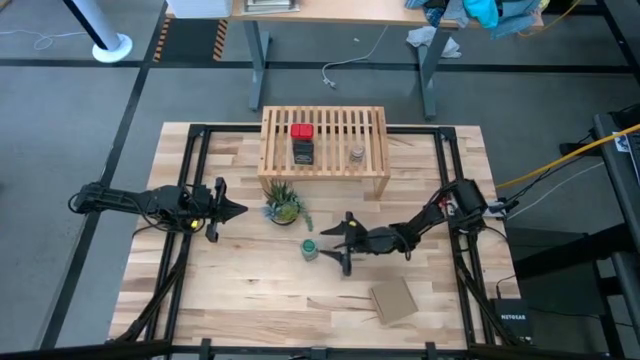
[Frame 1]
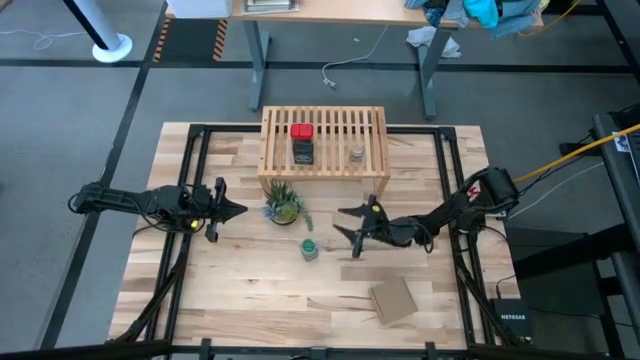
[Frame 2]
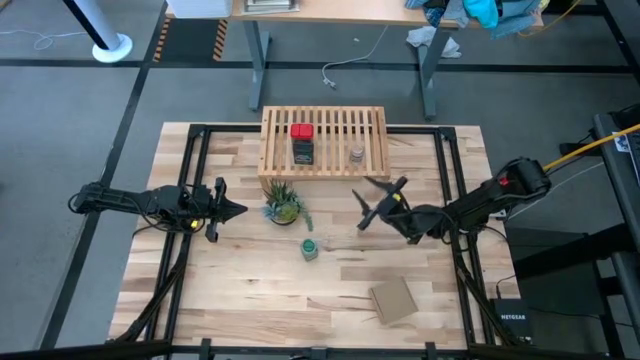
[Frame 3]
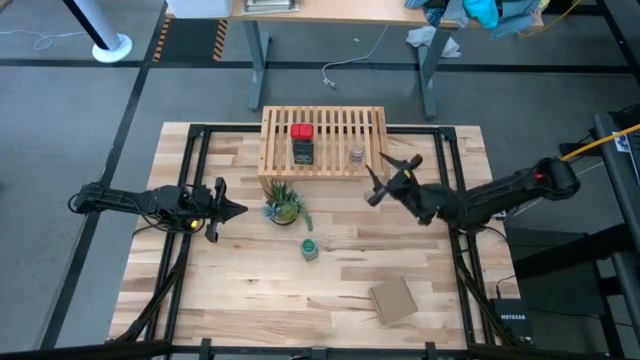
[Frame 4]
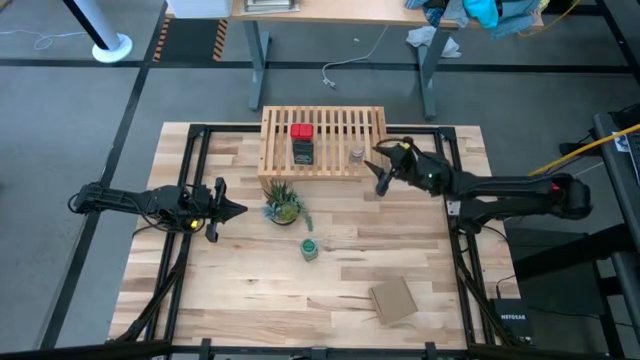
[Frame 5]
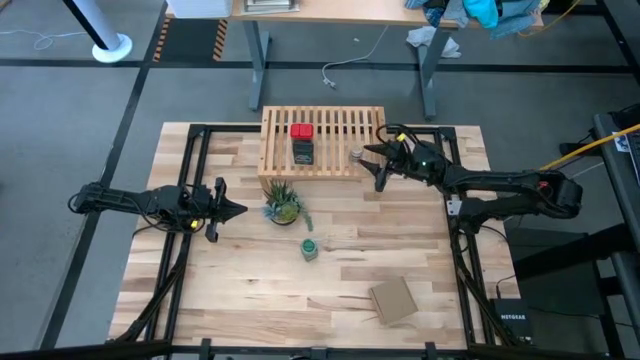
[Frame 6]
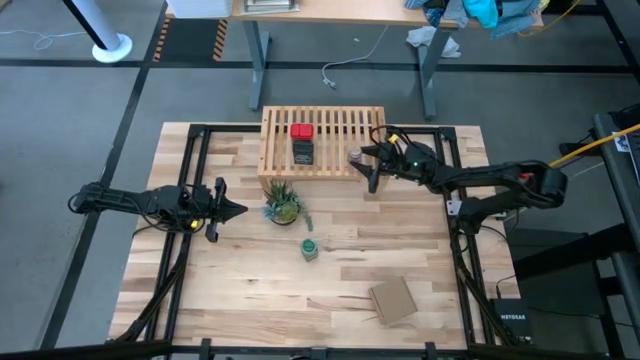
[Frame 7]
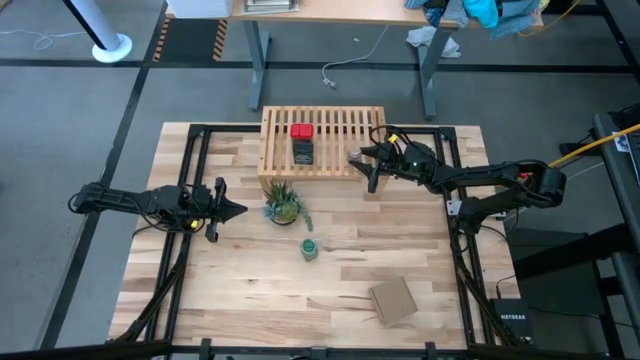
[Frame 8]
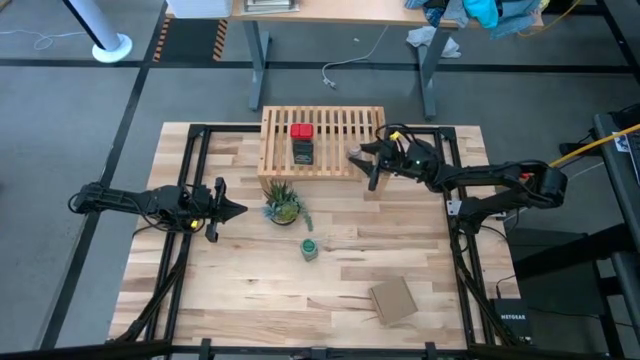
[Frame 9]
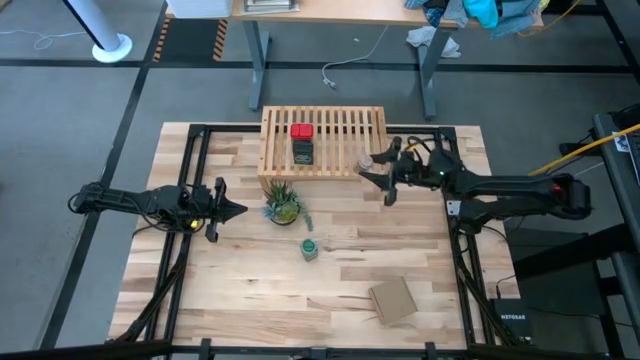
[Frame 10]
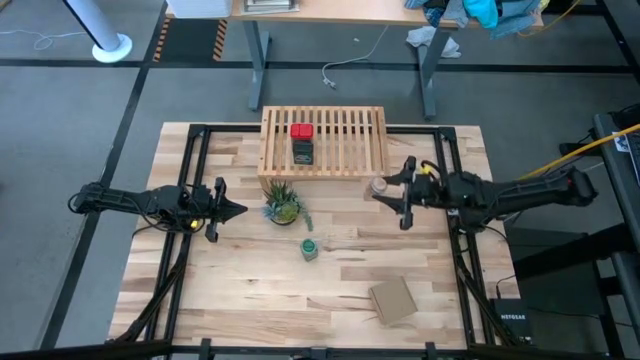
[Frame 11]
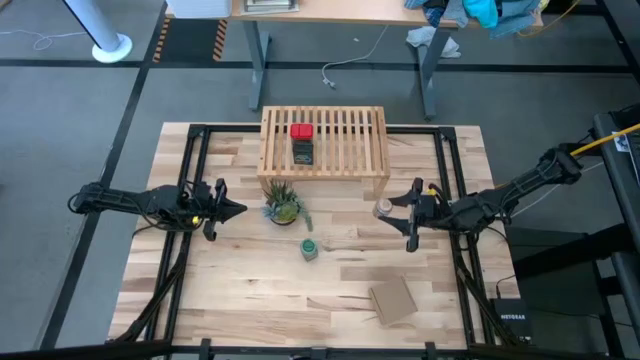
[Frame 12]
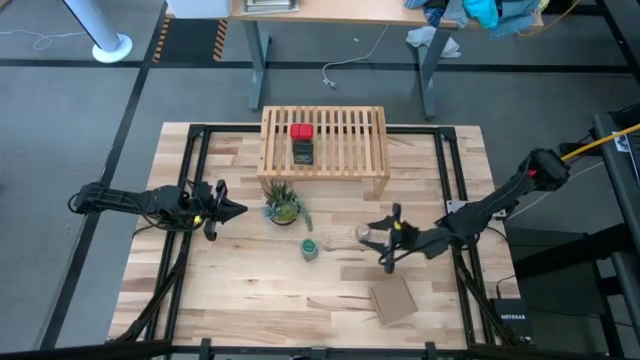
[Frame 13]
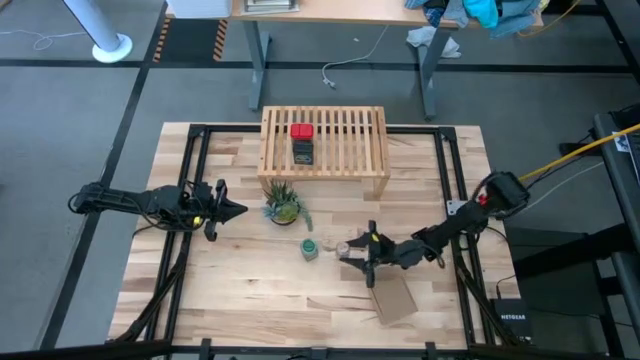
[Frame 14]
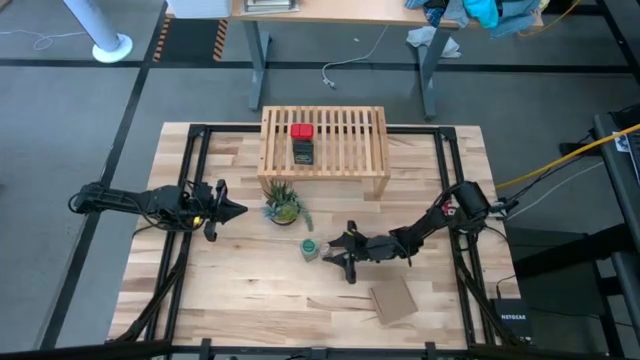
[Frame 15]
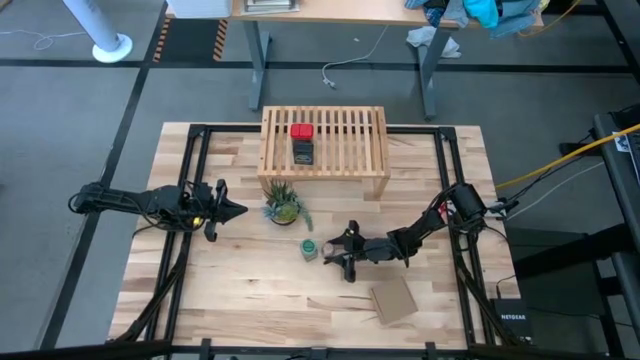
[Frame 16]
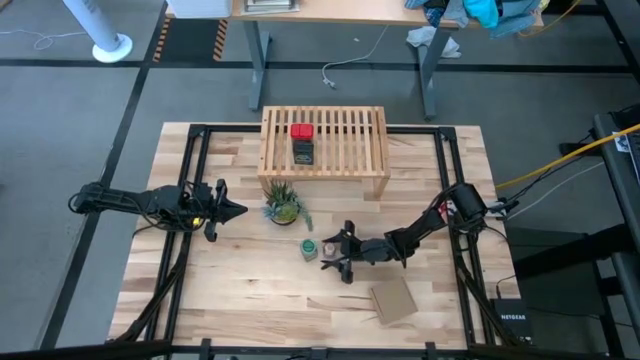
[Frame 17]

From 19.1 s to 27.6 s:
Task: Shelf spices
Remove the brown seasoning bottle from the shelf

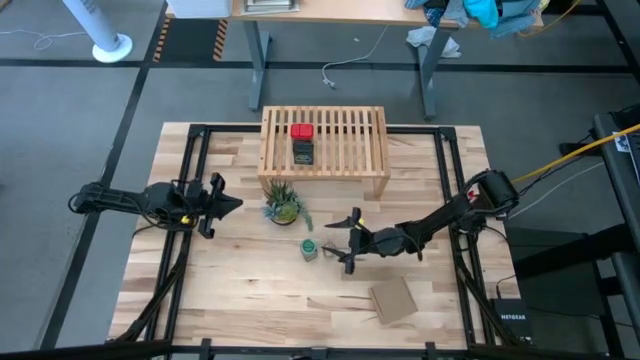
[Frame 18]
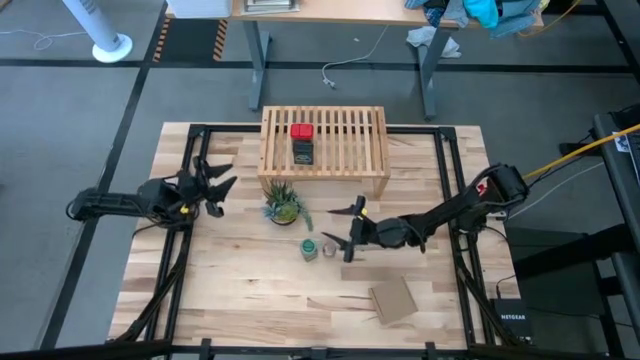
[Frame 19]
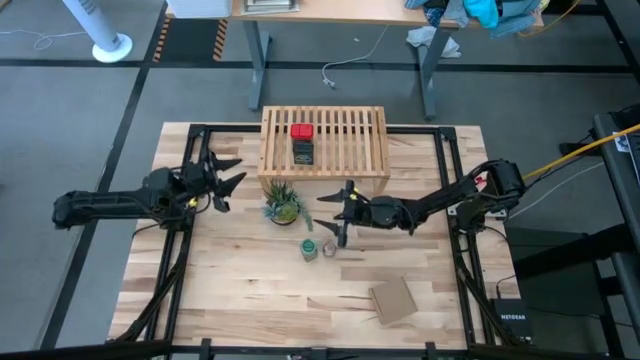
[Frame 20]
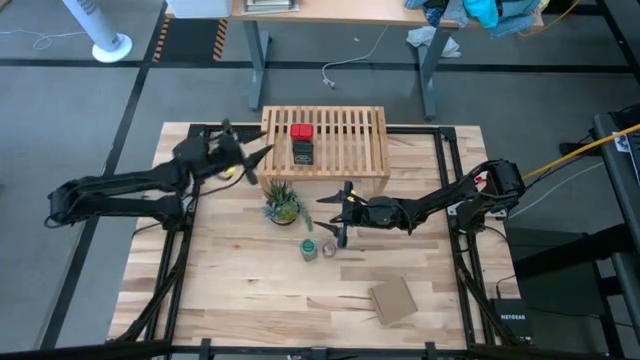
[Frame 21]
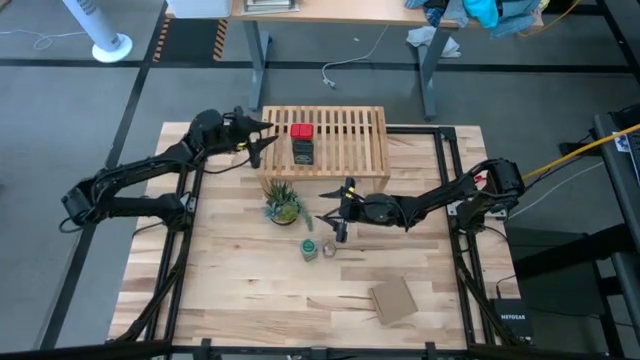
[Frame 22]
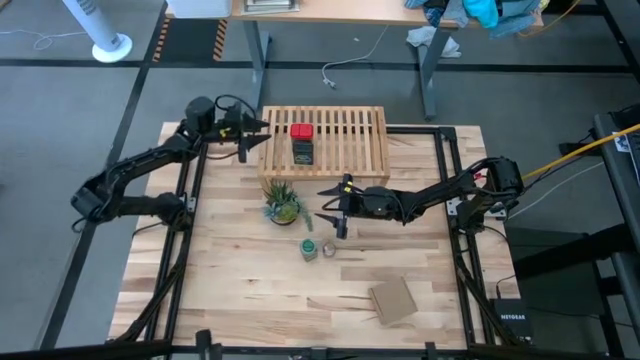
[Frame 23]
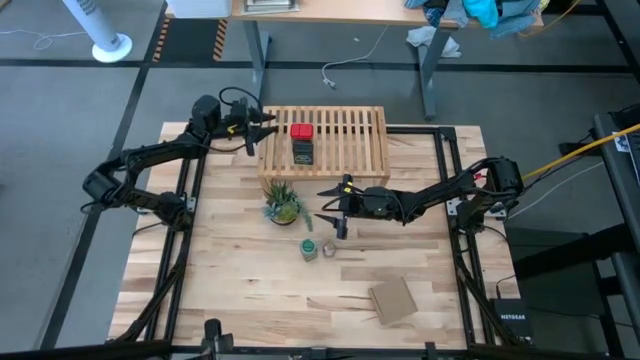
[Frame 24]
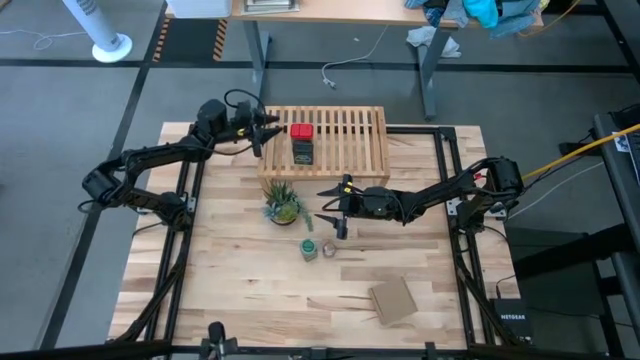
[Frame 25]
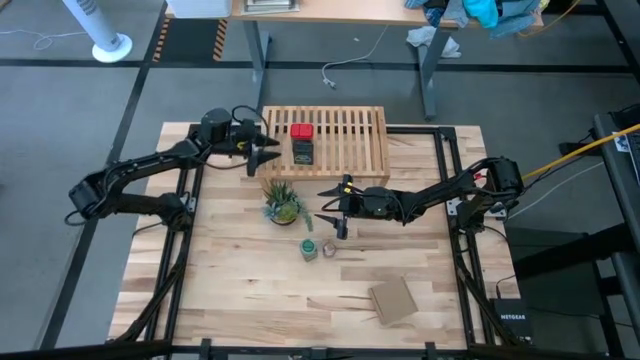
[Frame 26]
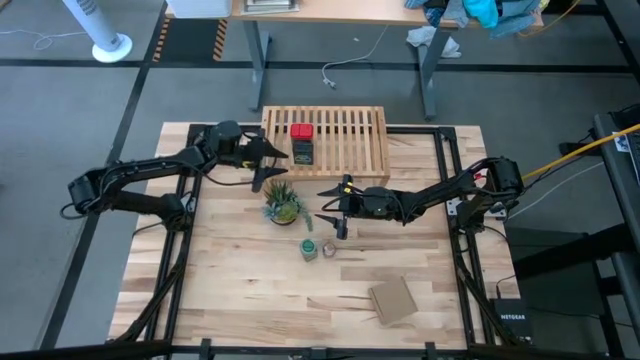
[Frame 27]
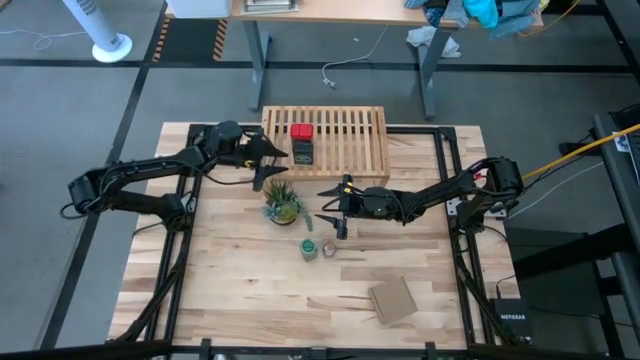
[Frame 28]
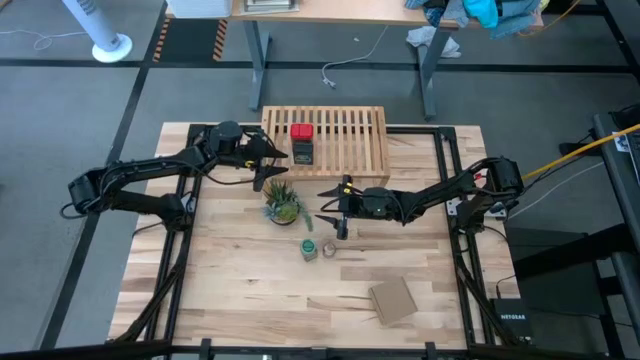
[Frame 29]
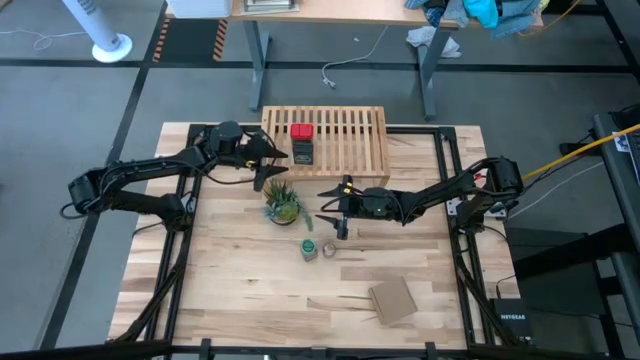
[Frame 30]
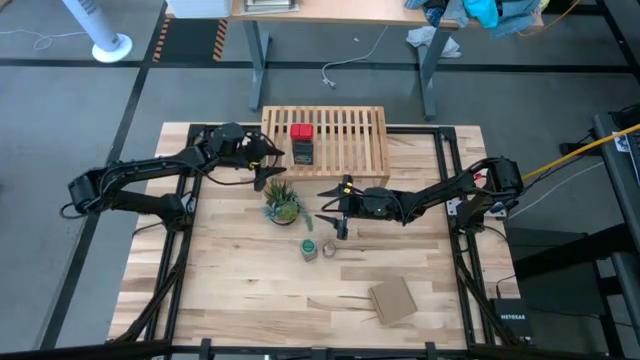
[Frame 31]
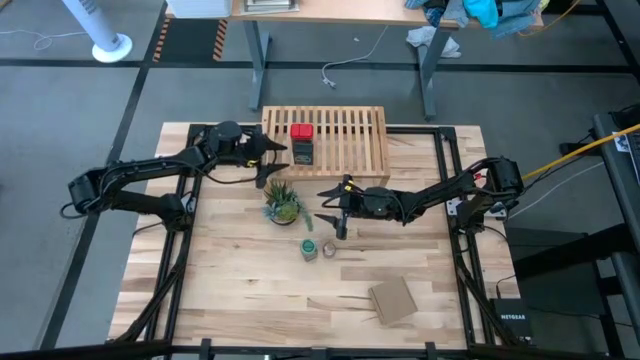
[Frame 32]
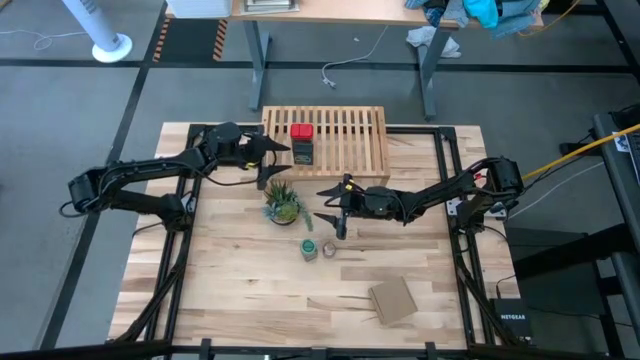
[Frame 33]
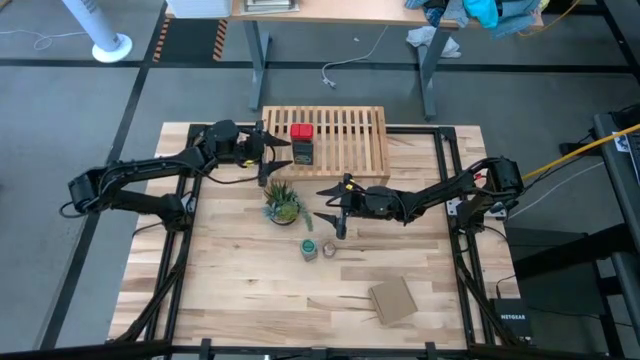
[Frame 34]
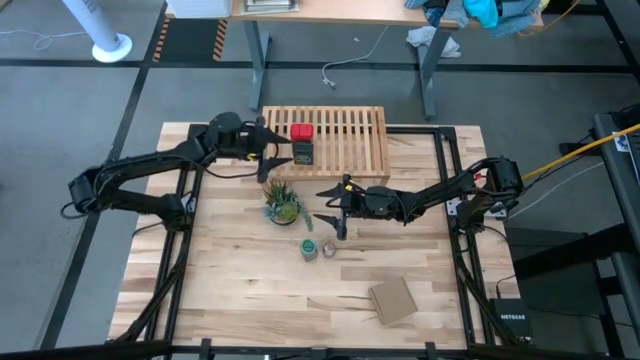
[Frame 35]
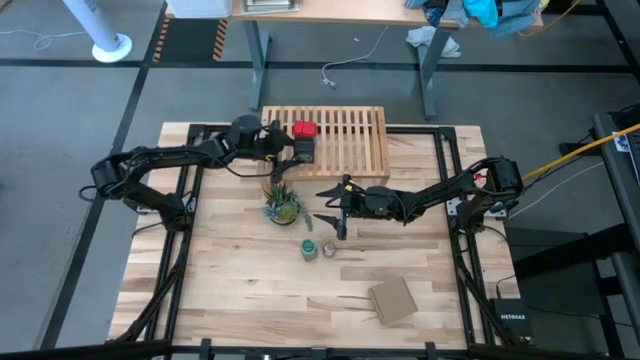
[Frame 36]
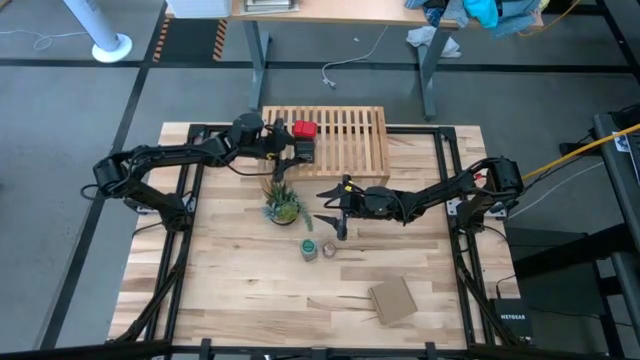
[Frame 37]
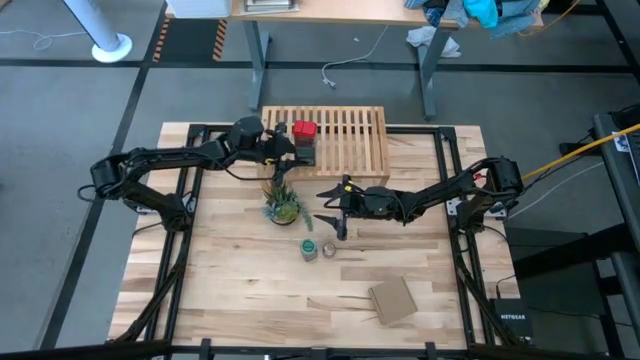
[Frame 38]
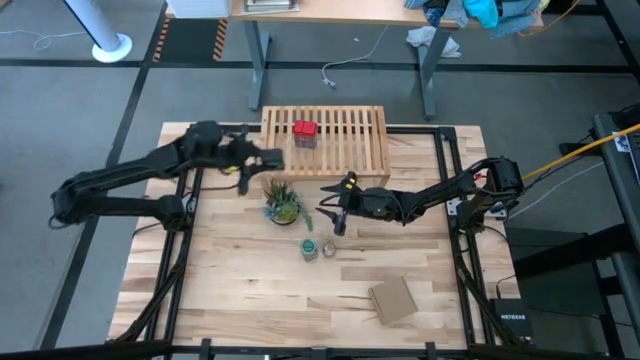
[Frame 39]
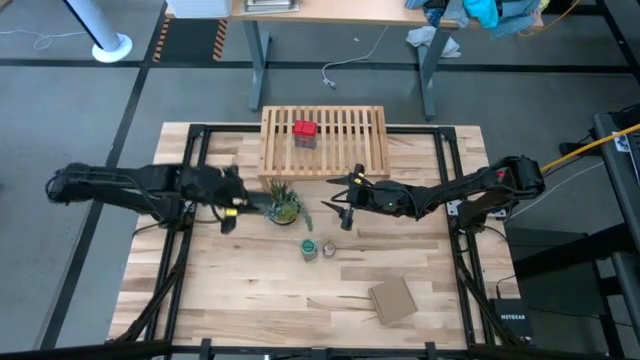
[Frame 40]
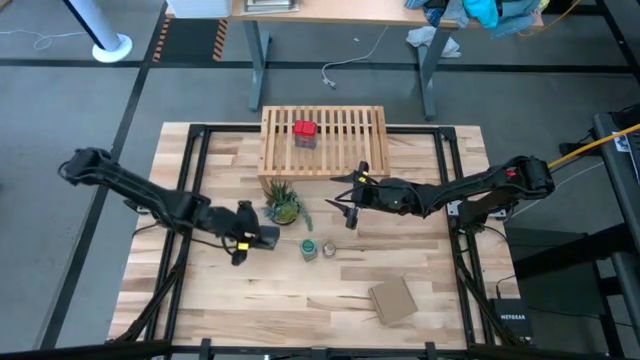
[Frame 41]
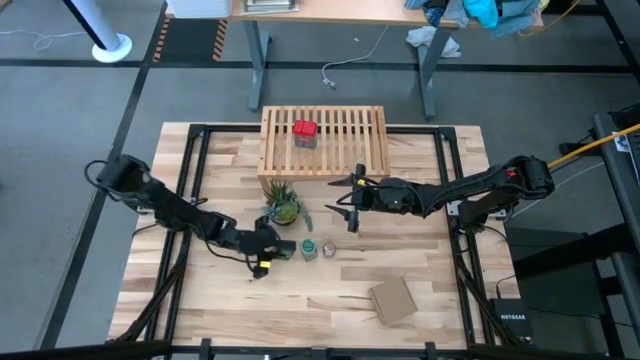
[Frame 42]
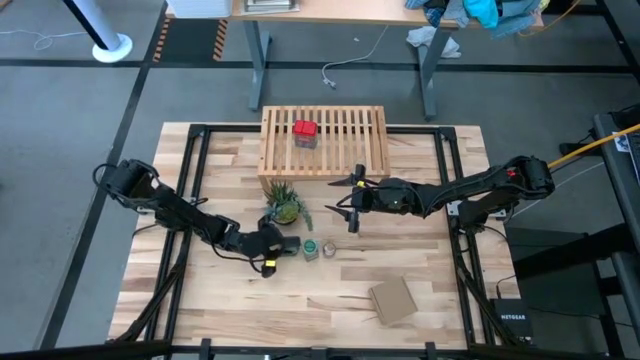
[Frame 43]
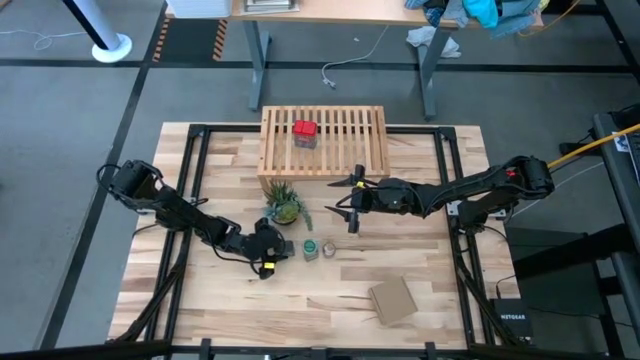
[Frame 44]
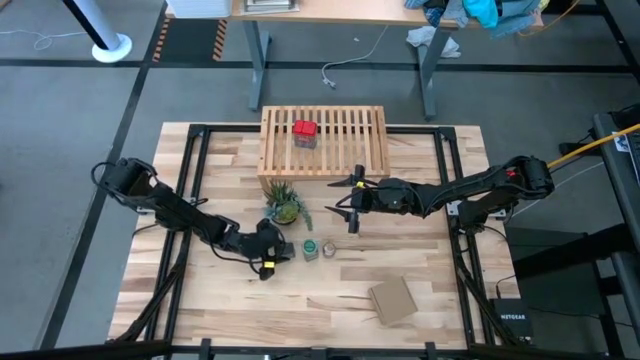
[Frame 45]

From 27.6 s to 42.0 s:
Remove the black seasoning can from the shelf
